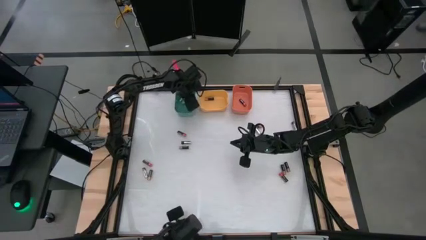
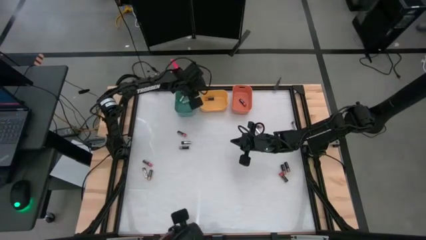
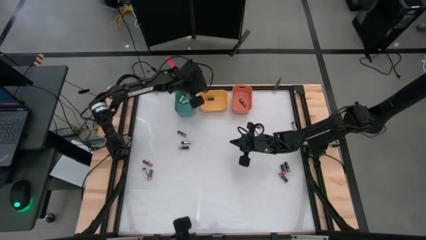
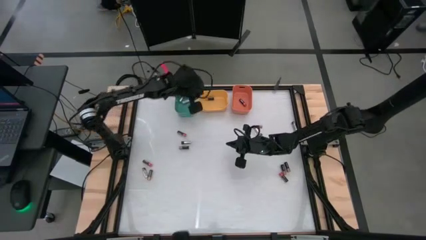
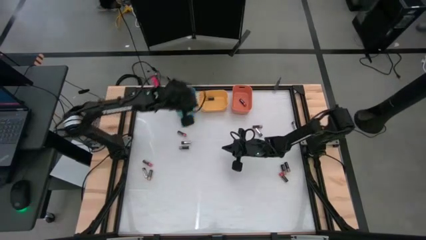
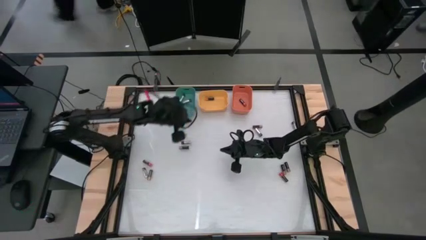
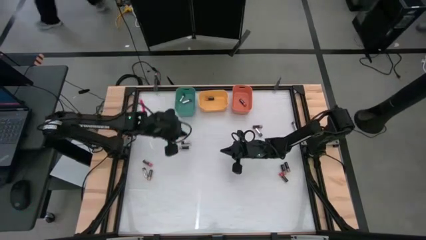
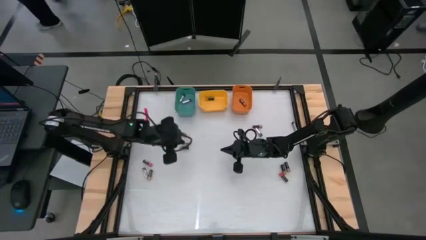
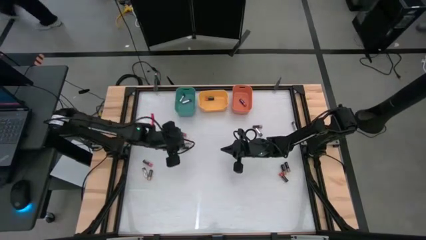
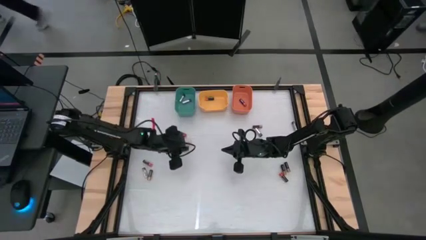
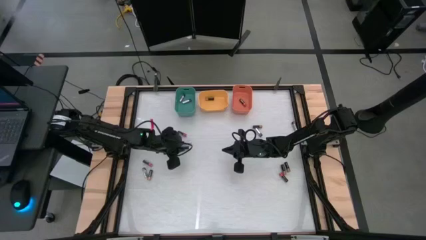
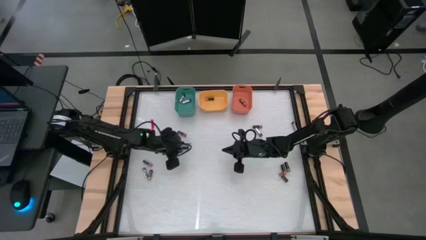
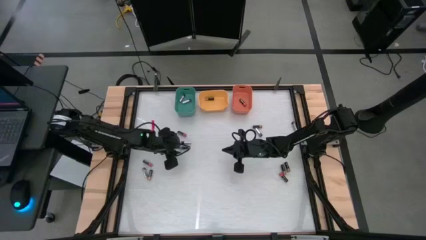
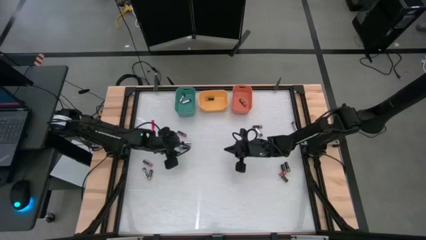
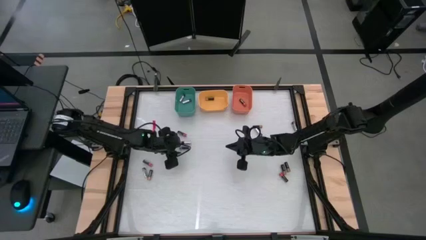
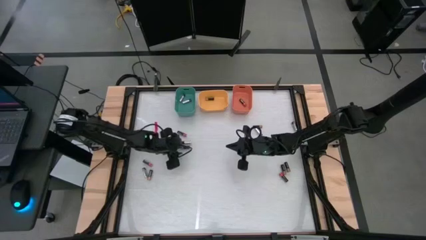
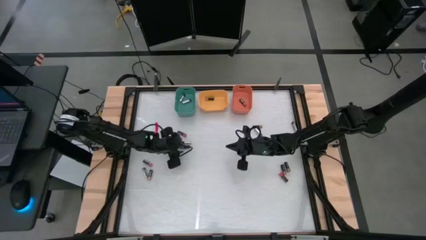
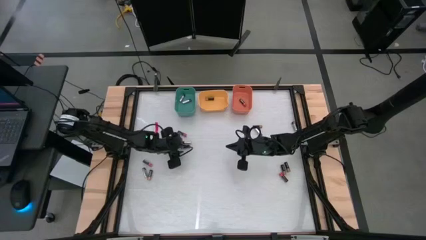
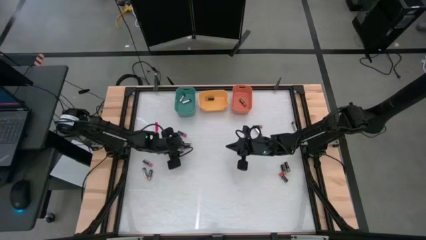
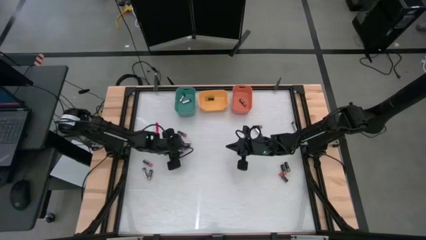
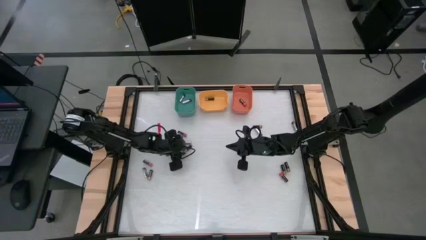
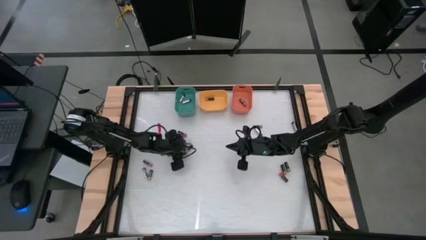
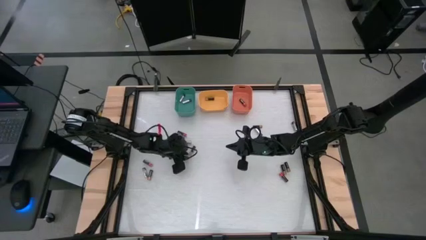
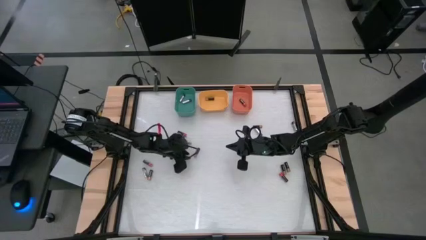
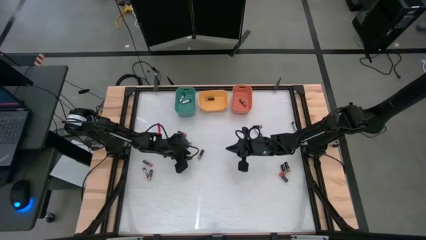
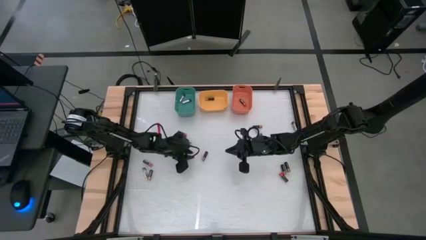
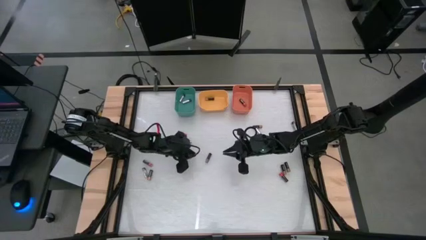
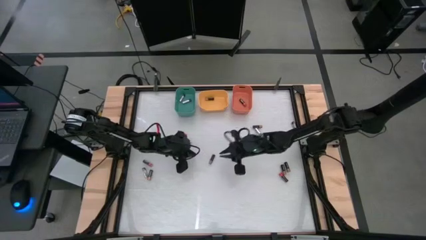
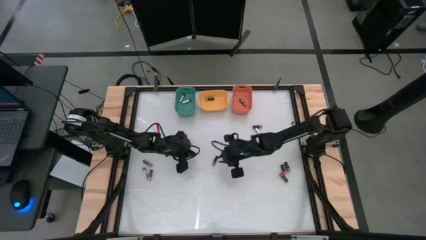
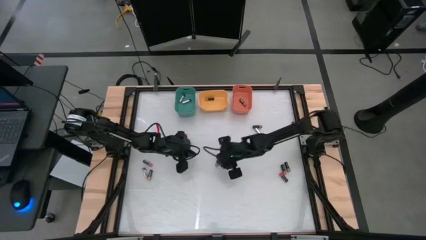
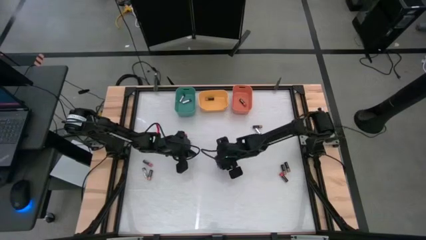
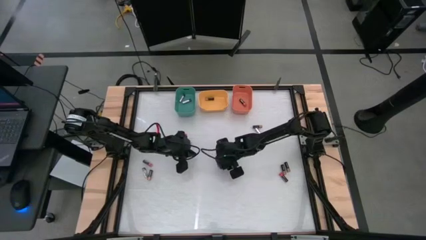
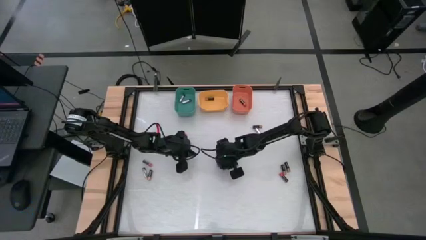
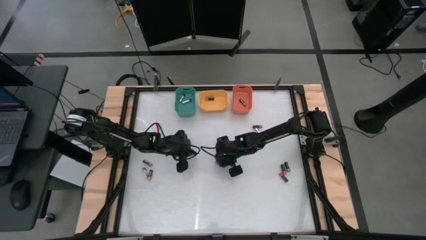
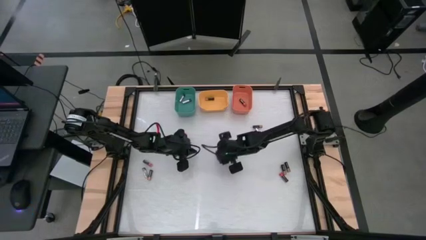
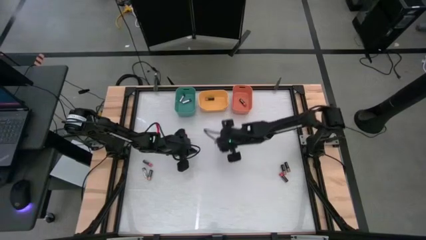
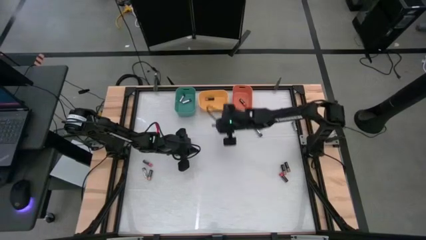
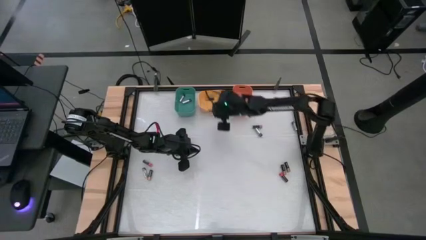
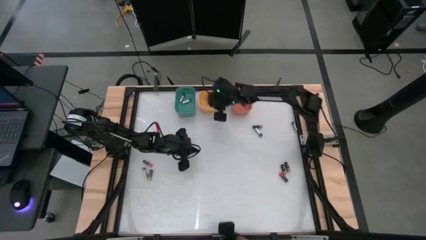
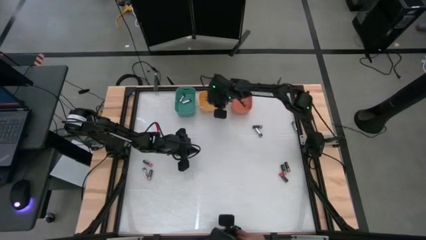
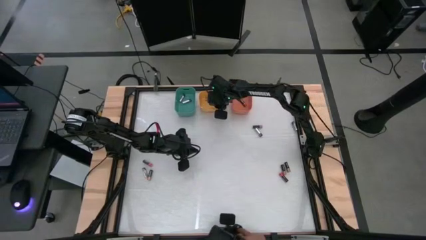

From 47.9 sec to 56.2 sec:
Task: Sort batteries
Put the brown battery into the yellow bin

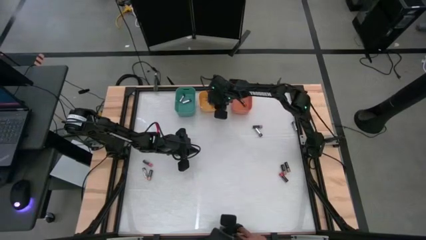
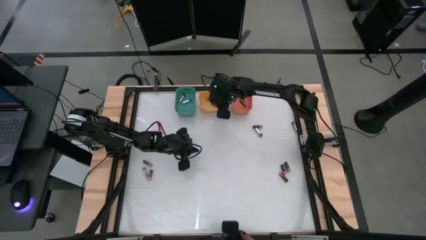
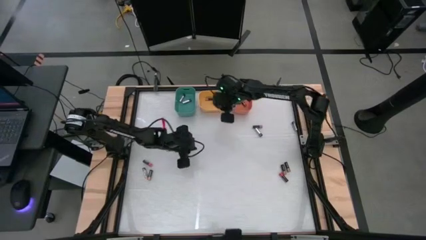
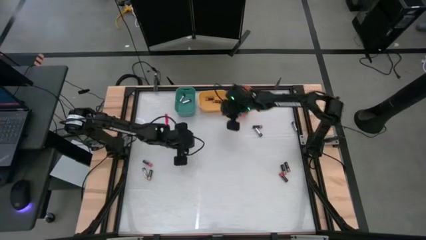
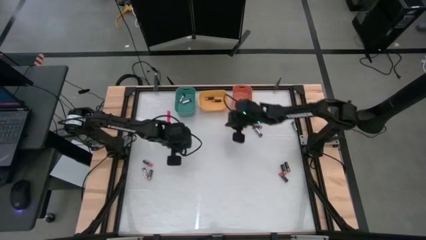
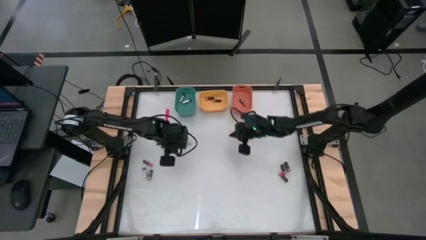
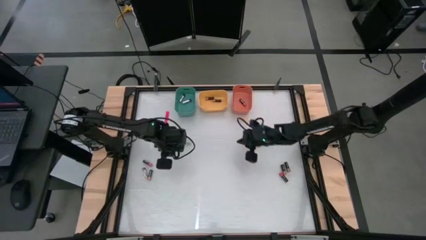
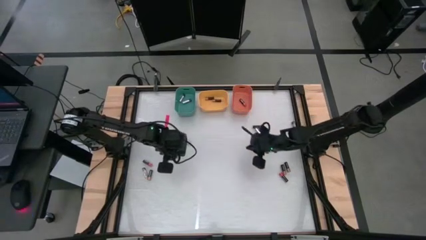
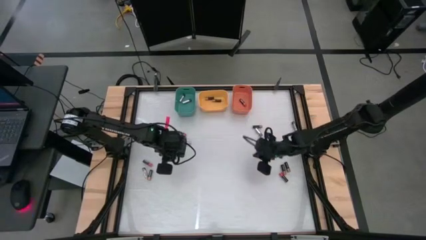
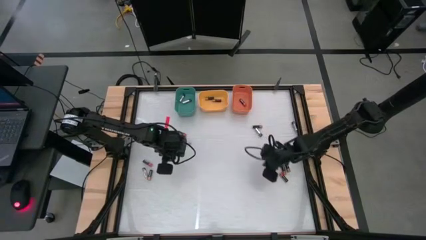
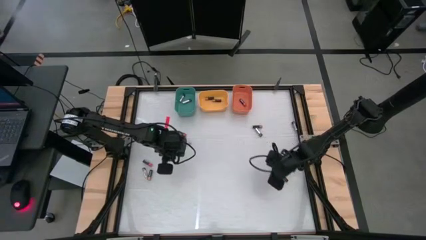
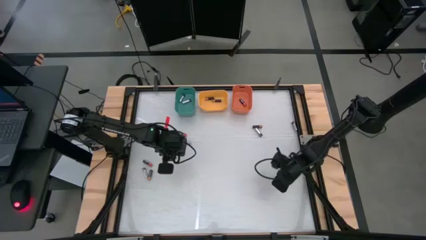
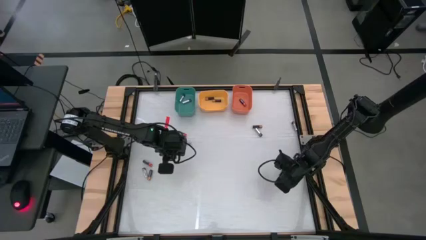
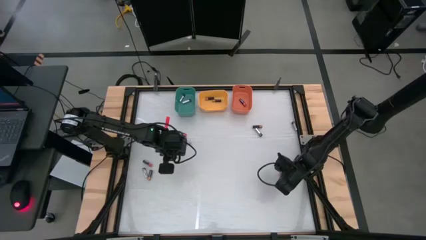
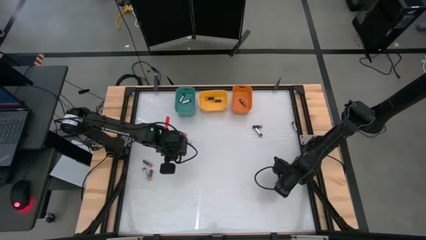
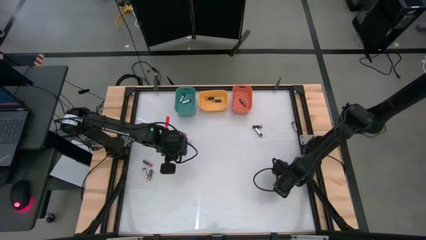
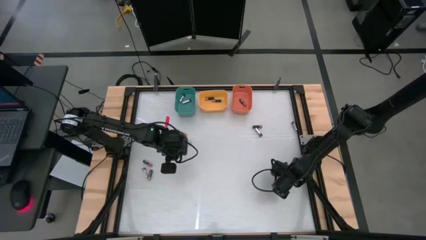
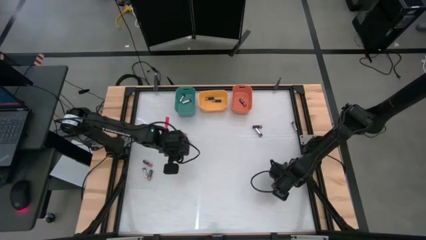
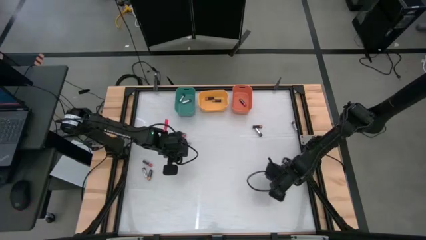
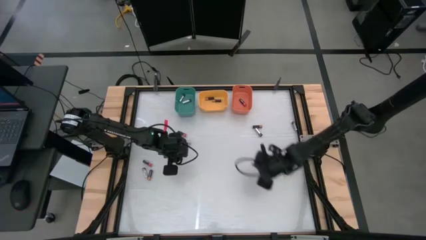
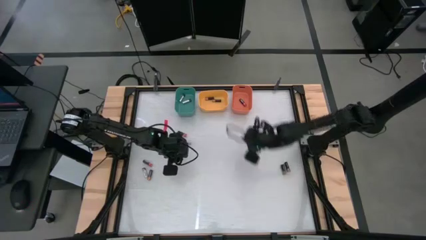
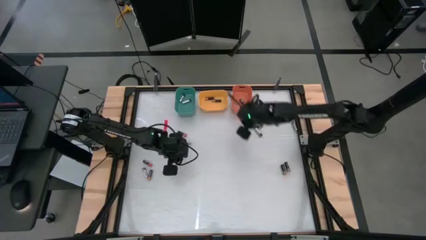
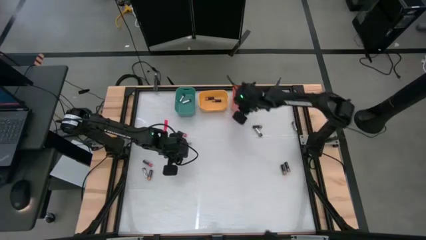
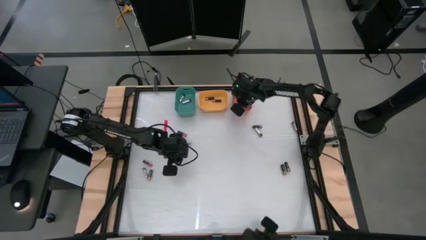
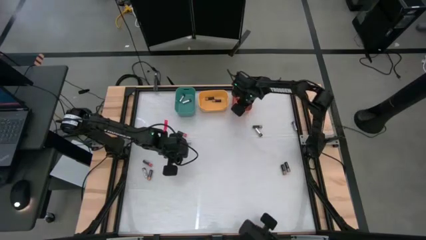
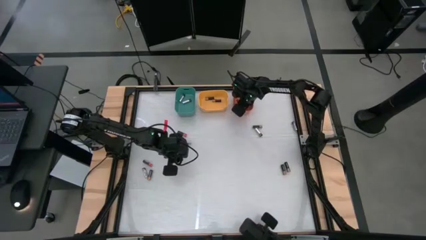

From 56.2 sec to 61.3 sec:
Put the red battery into the orange bin

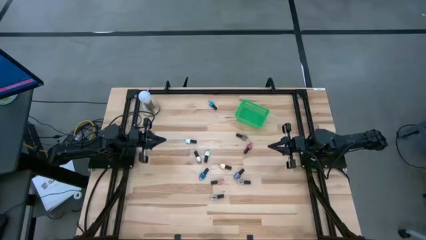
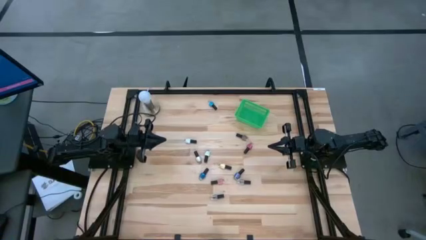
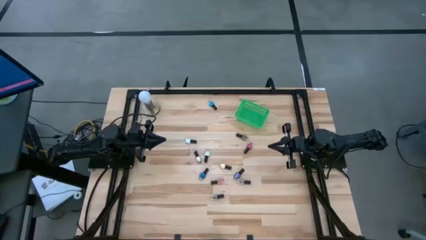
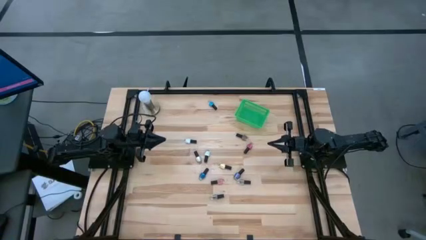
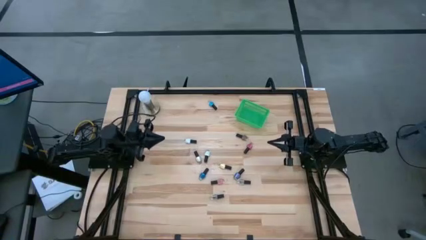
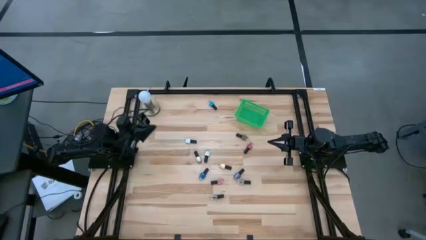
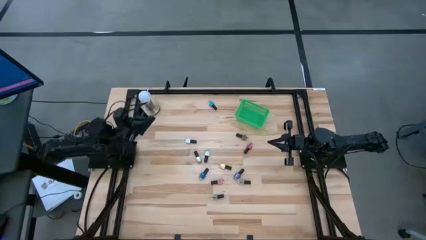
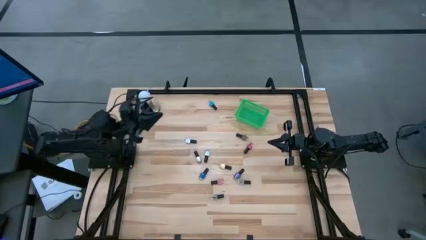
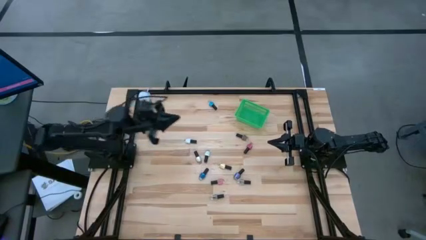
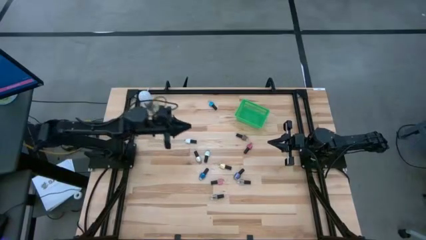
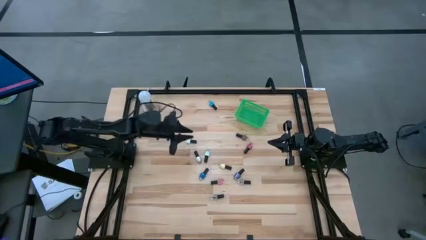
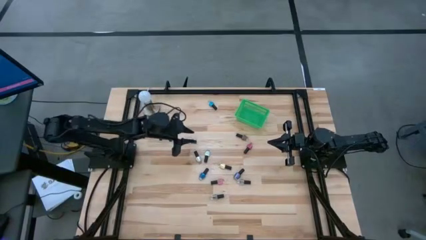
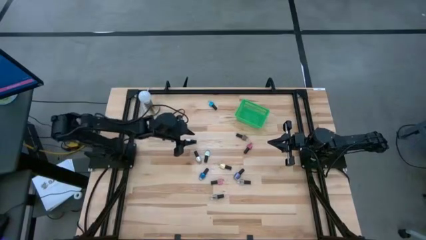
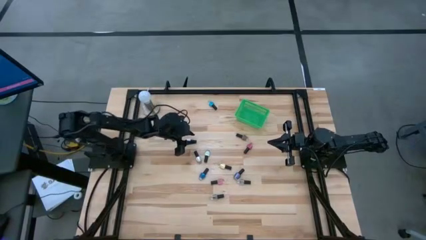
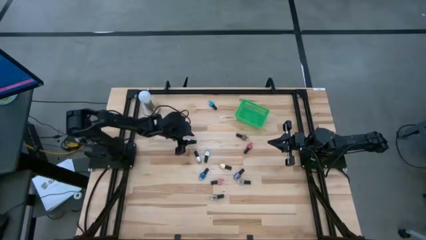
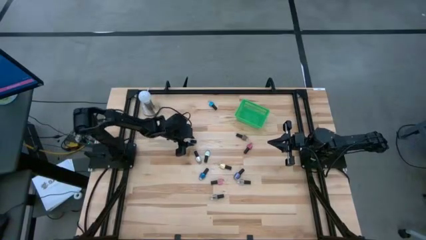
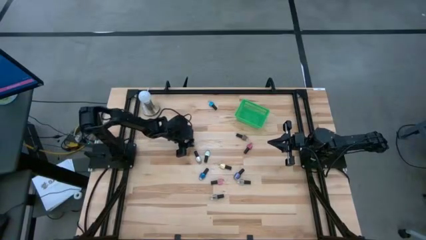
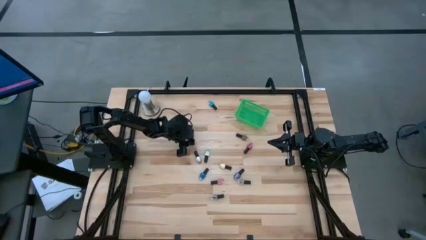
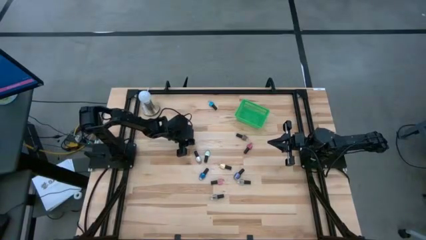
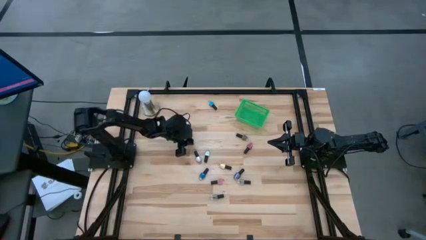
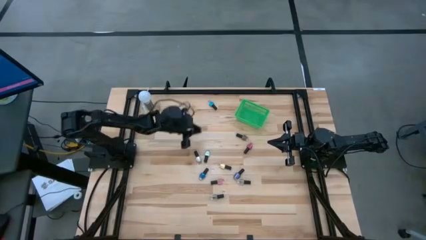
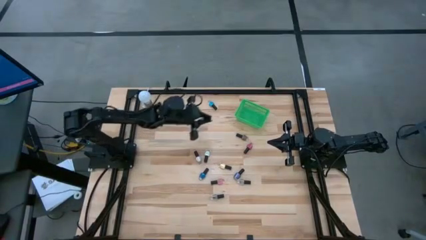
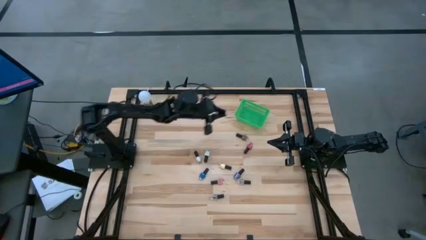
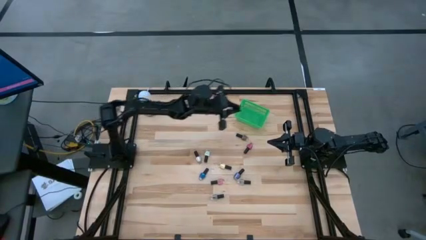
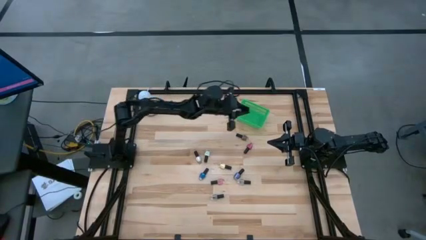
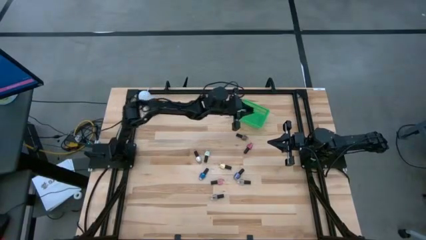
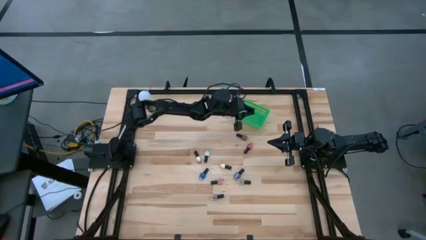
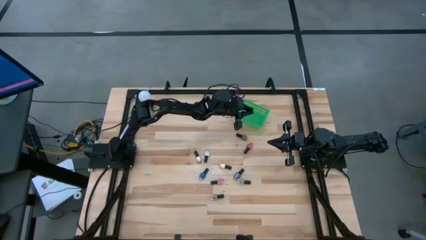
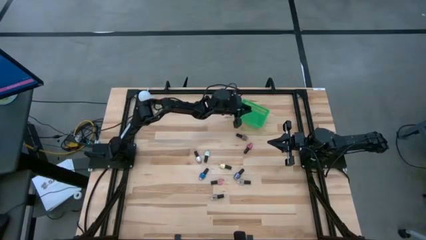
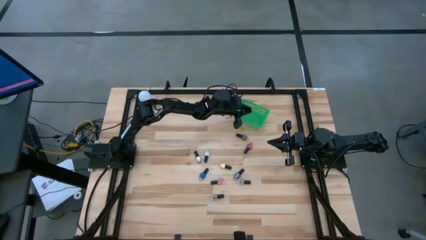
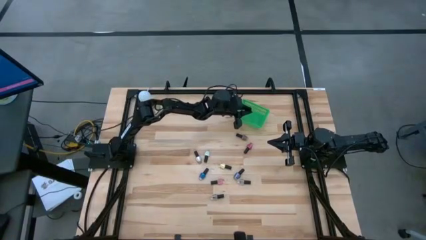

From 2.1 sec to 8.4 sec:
Task: Pick & Place Nail Polish
Put the top left white nail polish into the green bin
